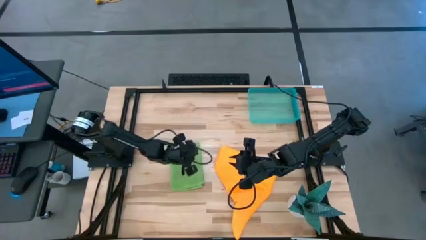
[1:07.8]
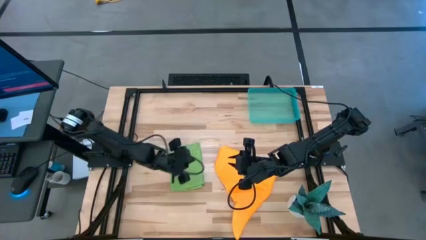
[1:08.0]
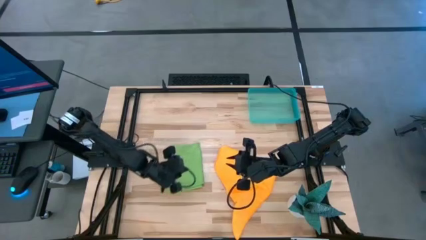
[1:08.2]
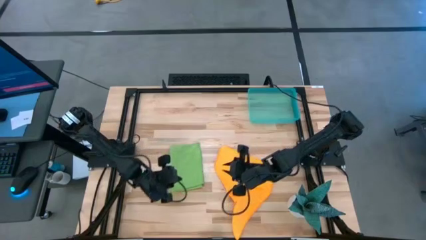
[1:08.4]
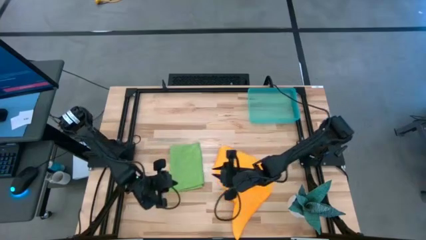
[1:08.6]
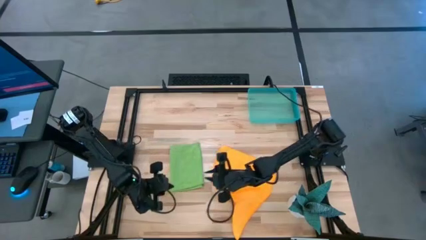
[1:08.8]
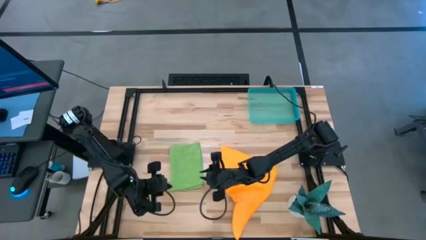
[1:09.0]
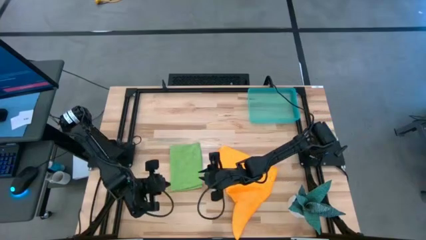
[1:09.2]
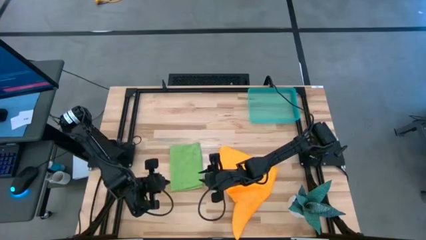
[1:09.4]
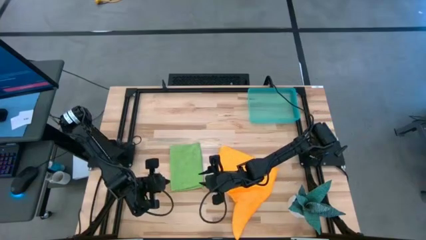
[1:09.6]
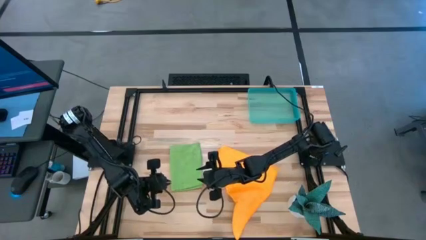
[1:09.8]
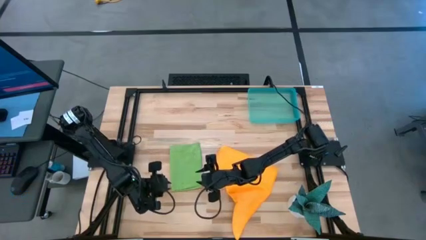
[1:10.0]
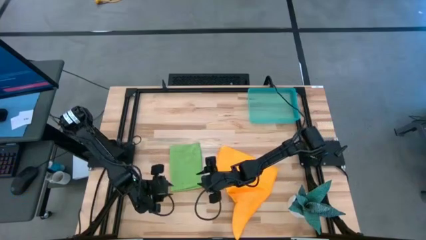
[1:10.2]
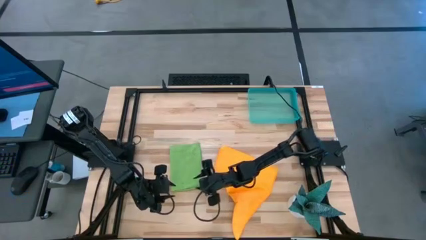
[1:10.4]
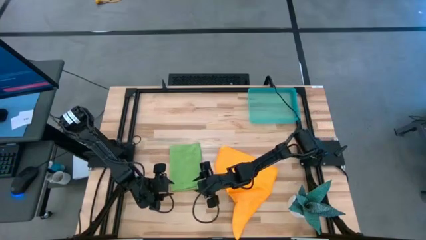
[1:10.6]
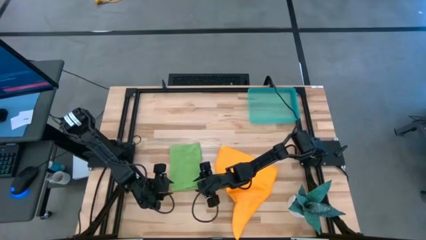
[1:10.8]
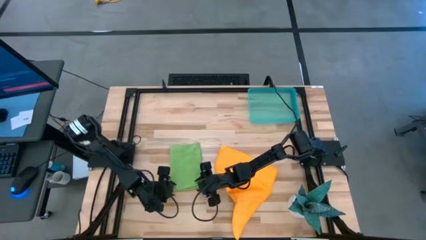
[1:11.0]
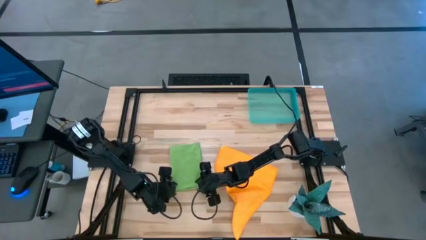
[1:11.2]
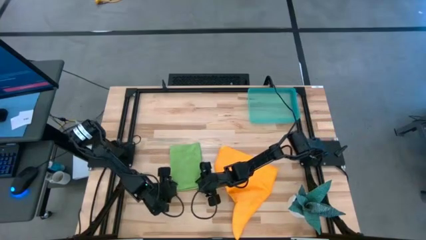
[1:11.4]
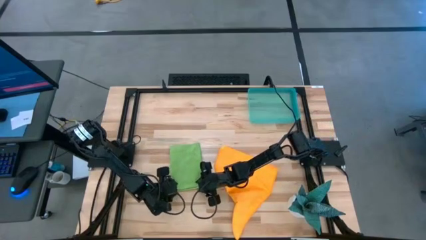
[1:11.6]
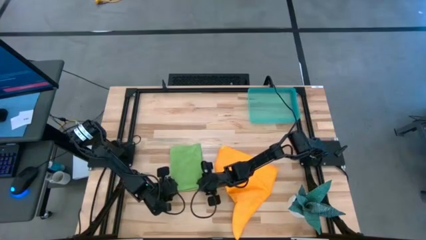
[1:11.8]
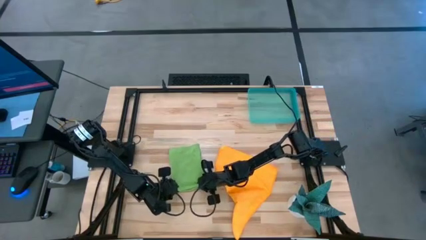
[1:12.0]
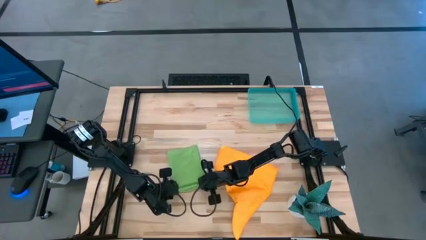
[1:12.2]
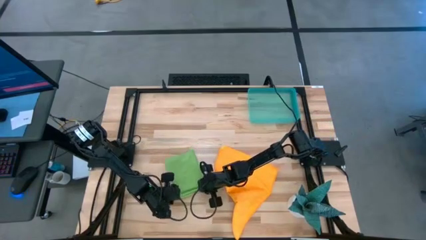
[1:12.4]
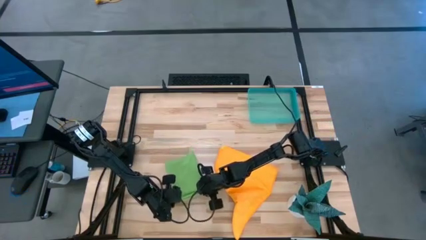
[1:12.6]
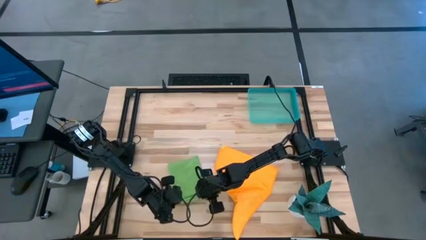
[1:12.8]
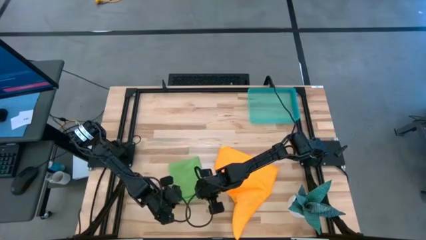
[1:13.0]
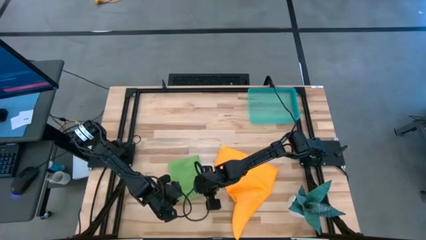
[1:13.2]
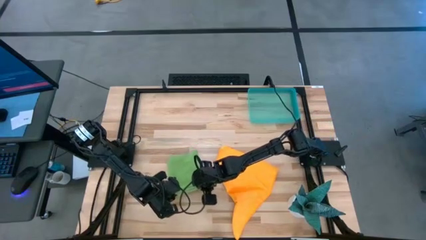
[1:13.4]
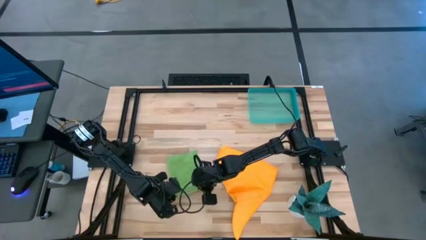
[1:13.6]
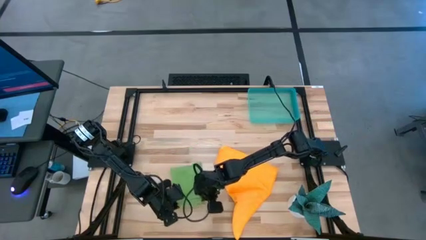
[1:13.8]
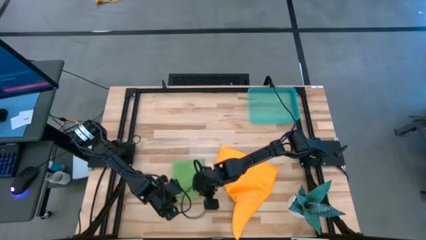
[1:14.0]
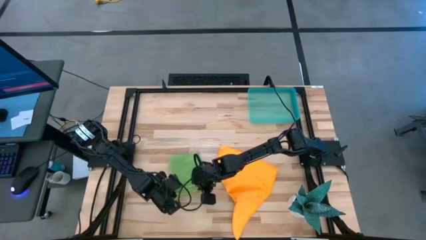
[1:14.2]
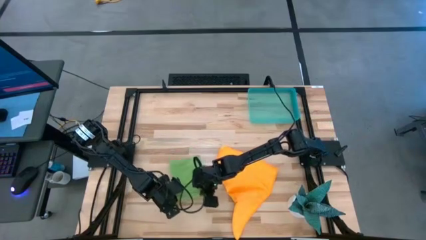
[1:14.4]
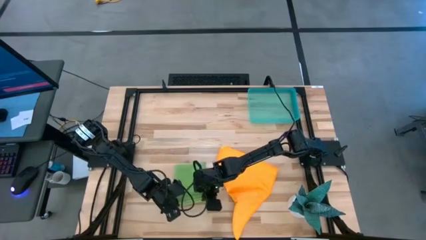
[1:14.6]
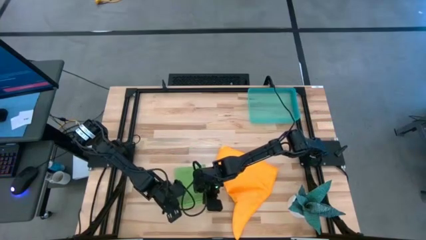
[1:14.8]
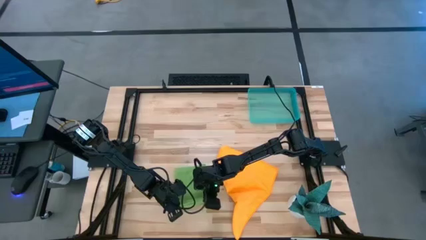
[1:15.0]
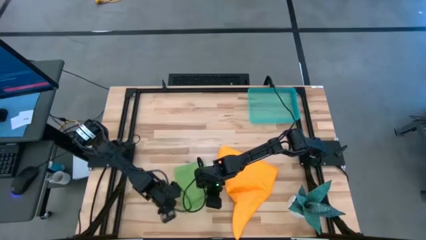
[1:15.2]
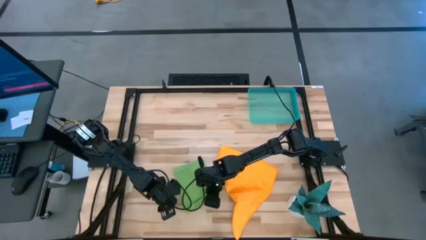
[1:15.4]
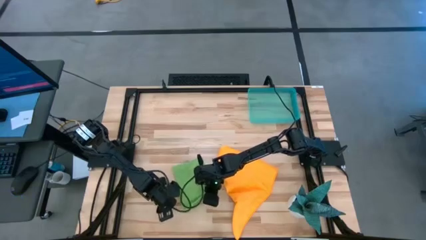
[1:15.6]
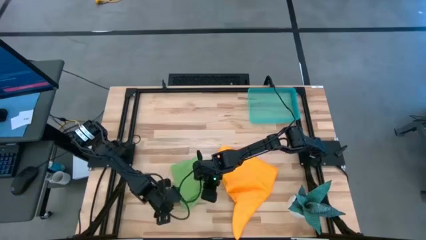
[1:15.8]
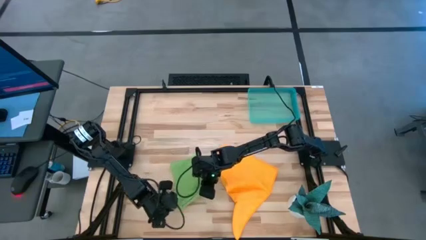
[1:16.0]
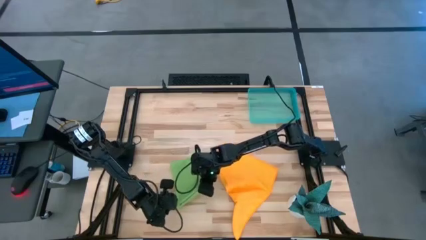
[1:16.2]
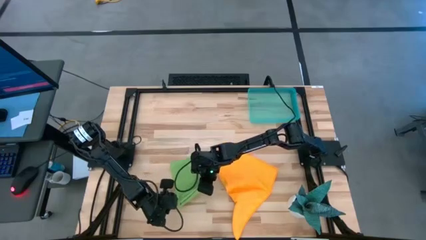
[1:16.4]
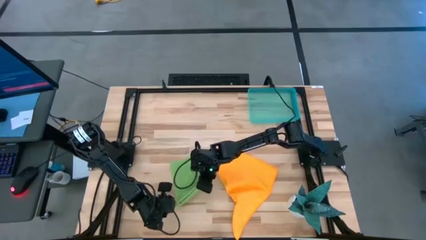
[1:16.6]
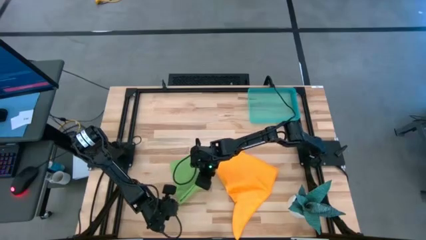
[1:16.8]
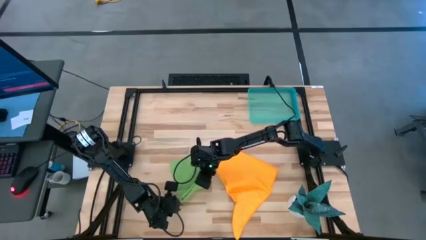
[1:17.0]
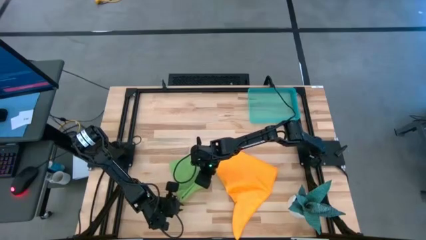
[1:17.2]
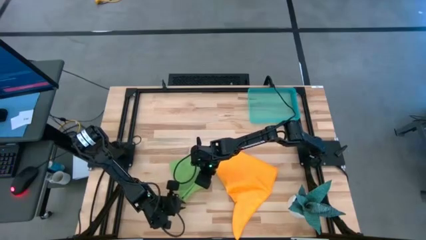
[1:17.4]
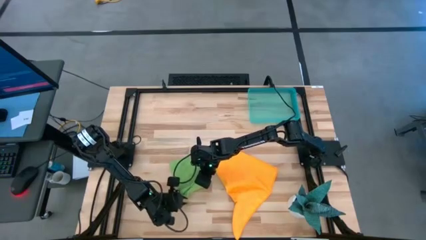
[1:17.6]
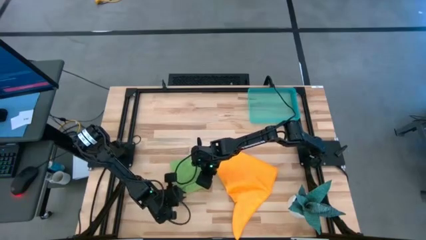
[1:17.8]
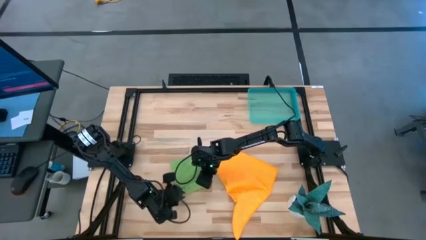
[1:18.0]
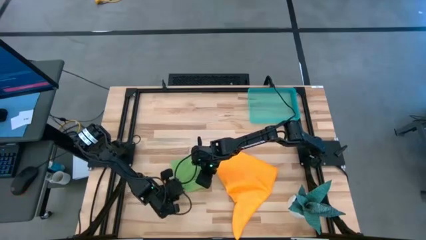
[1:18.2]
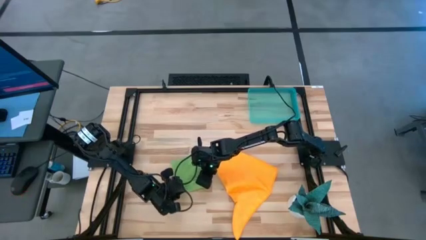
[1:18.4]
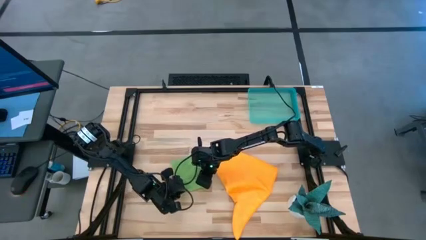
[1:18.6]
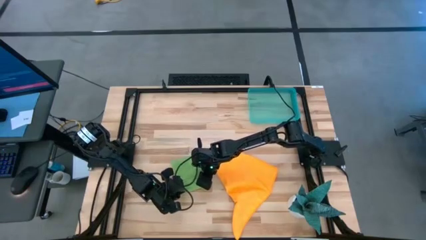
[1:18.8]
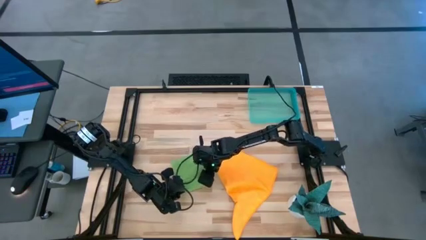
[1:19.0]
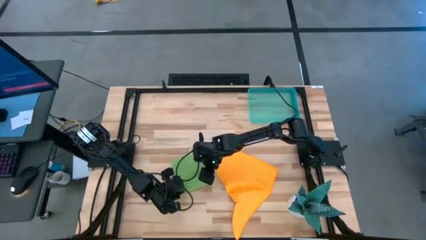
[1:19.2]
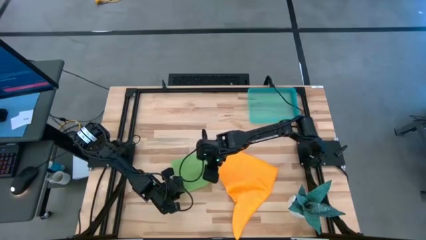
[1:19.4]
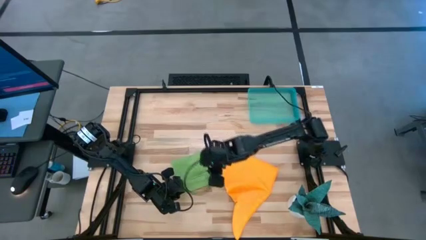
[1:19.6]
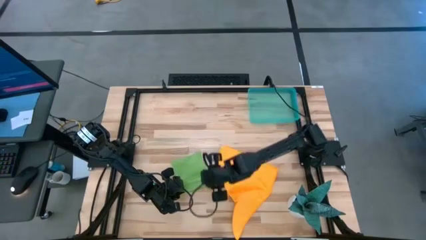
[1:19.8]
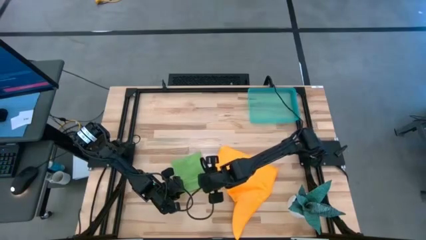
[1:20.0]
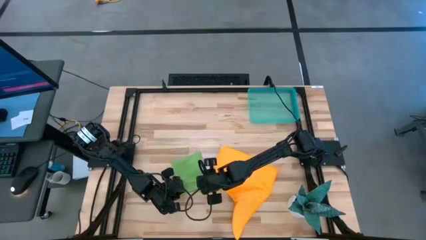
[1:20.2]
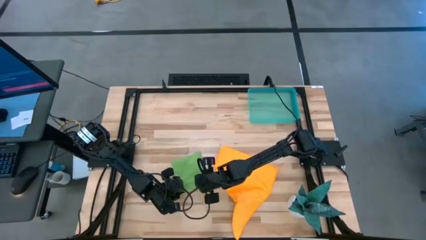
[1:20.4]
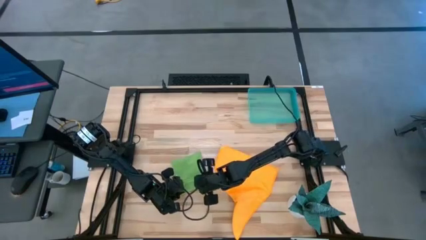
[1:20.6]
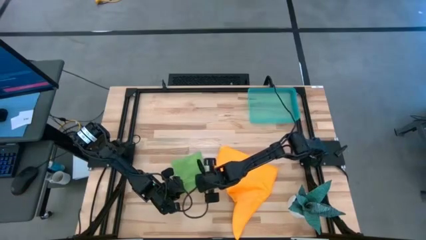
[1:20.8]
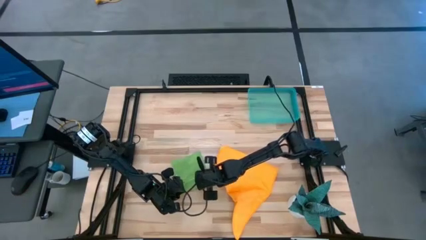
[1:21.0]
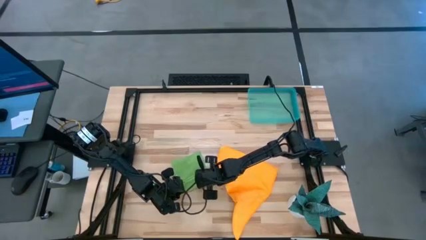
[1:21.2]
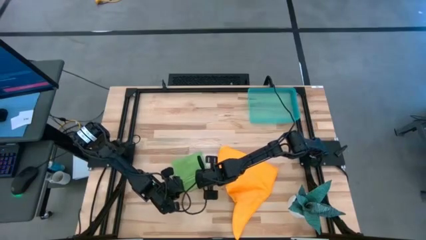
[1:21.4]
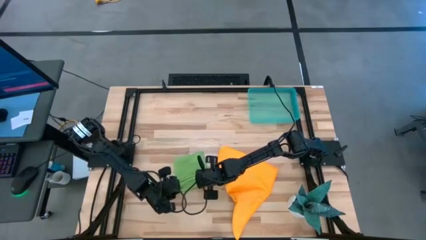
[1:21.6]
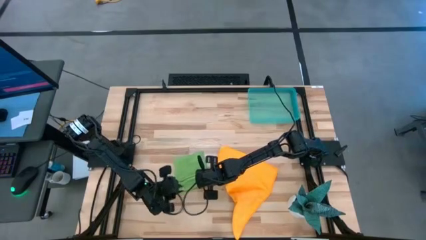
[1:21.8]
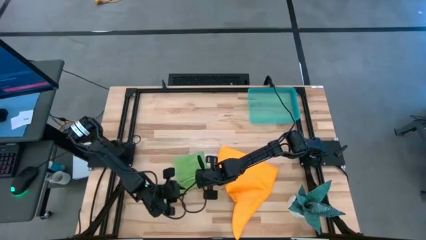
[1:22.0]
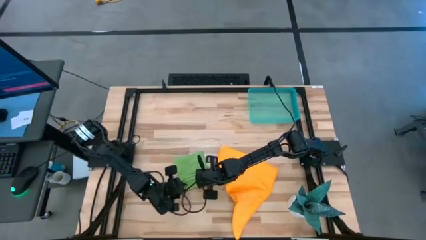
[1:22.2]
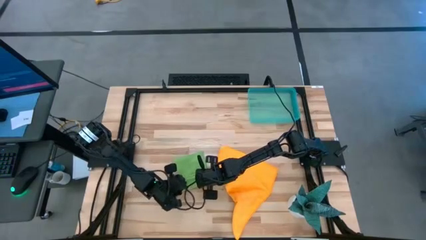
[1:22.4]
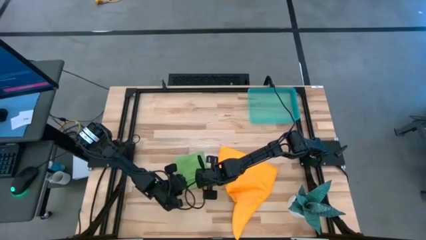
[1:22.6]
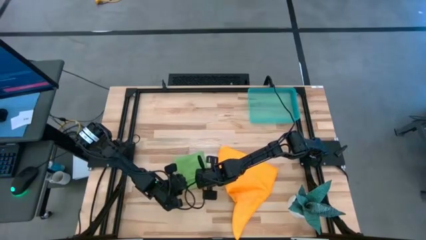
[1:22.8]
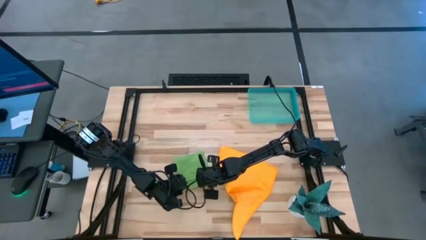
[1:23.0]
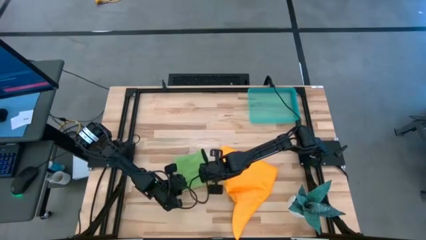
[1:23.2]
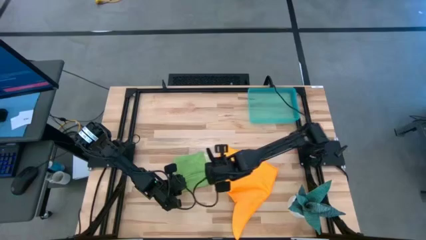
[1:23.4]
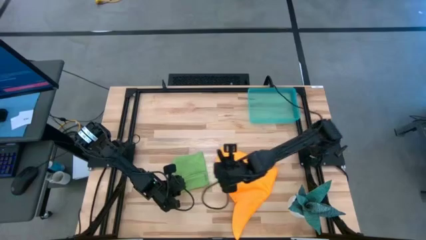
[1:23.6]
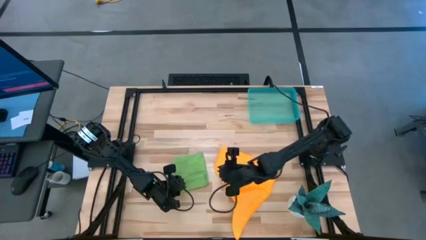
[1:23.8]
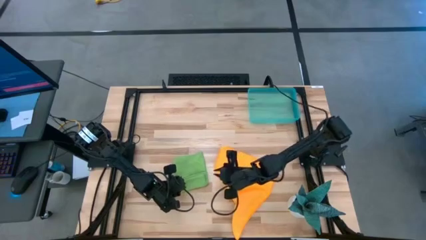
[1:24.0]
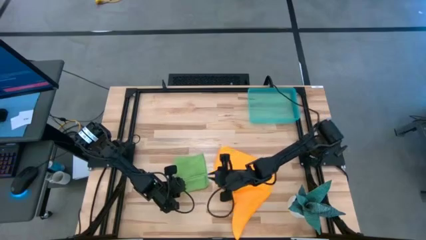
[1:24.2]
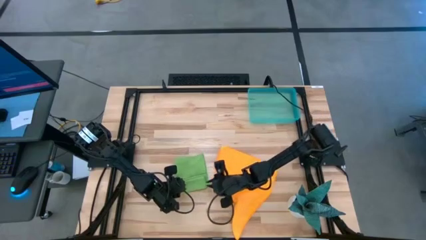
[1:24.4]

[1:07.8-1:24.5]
Task: Roll microfiber towels into tight, uniform cylinder then place into a basket
Roll the green microfiber towel
